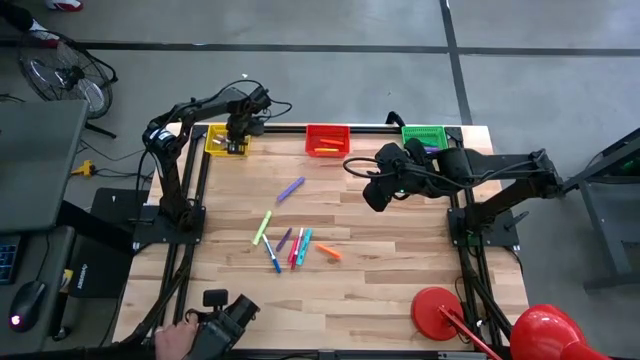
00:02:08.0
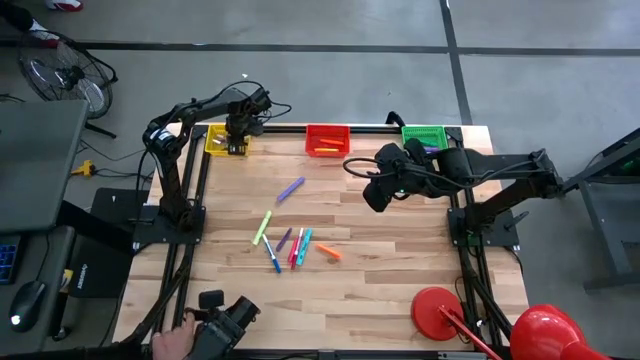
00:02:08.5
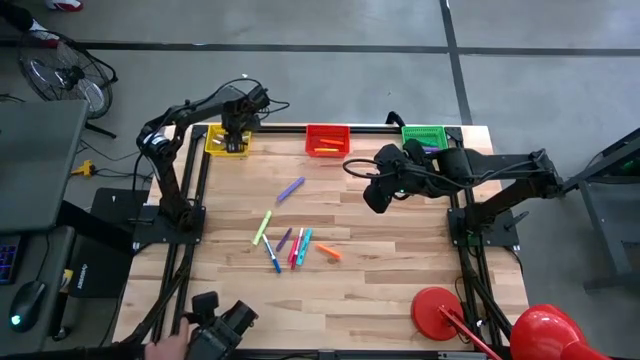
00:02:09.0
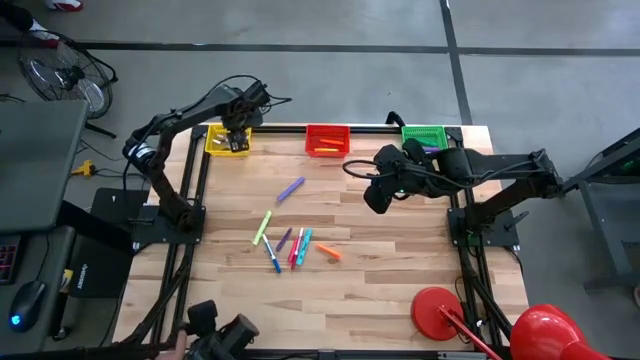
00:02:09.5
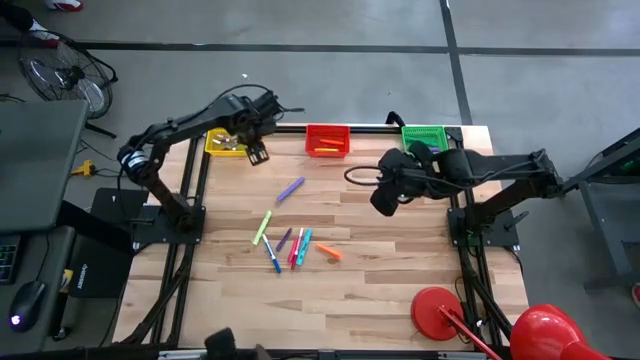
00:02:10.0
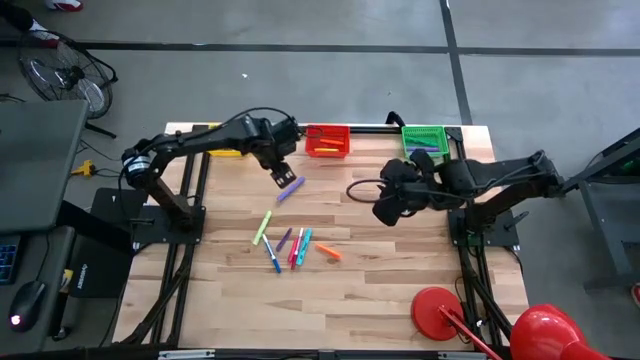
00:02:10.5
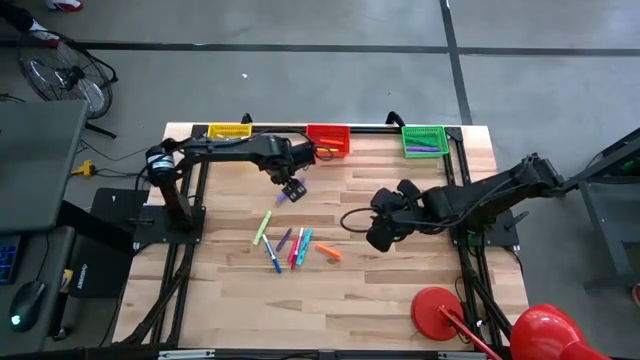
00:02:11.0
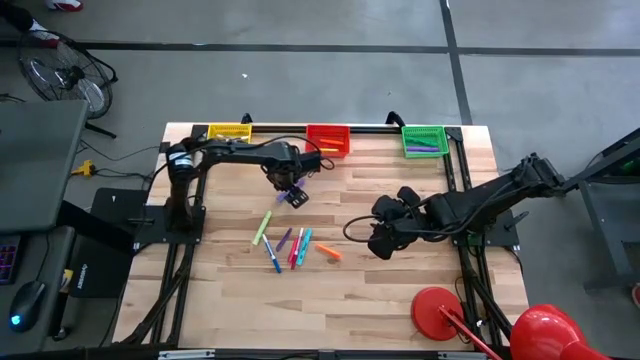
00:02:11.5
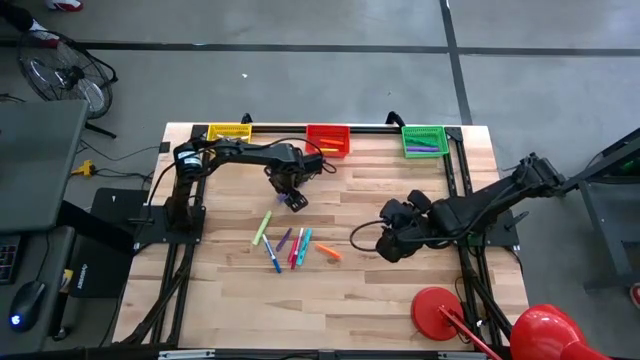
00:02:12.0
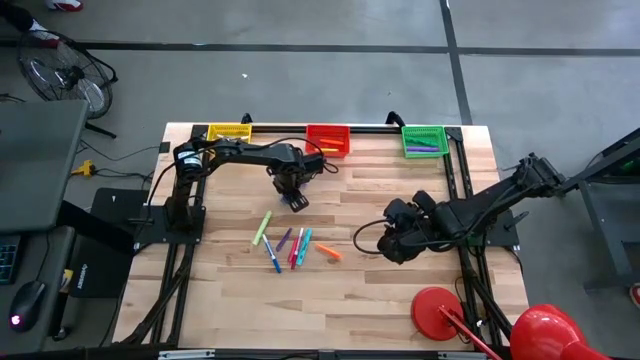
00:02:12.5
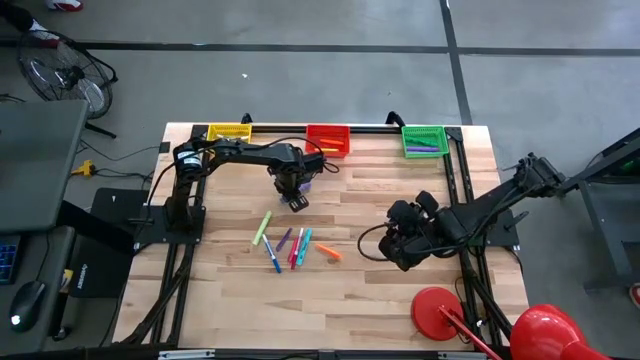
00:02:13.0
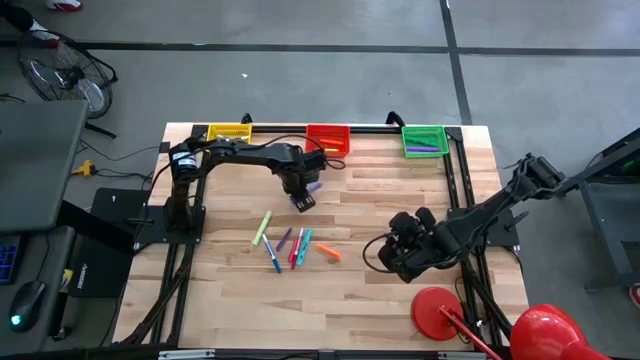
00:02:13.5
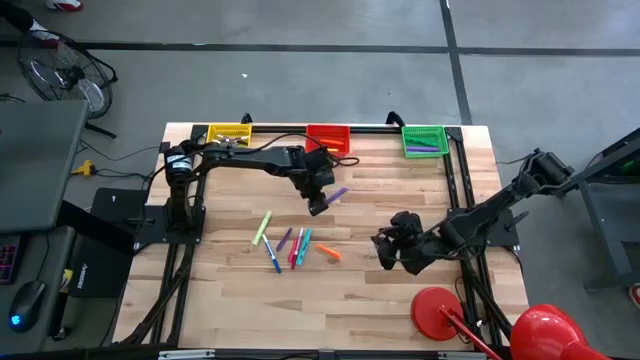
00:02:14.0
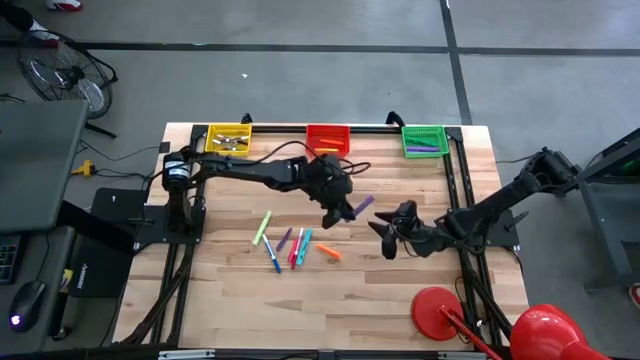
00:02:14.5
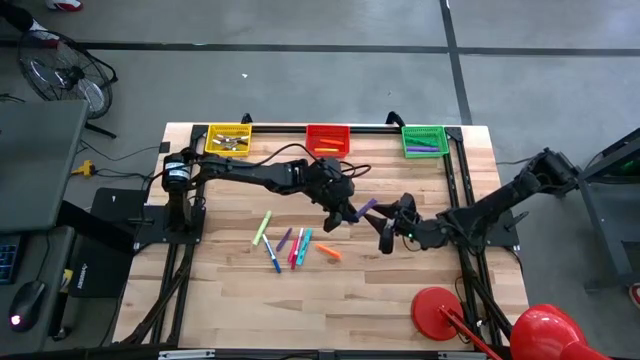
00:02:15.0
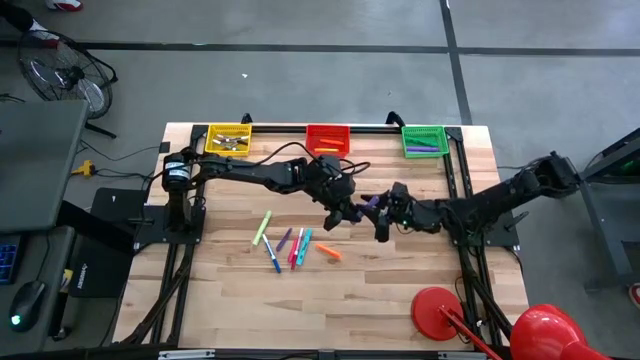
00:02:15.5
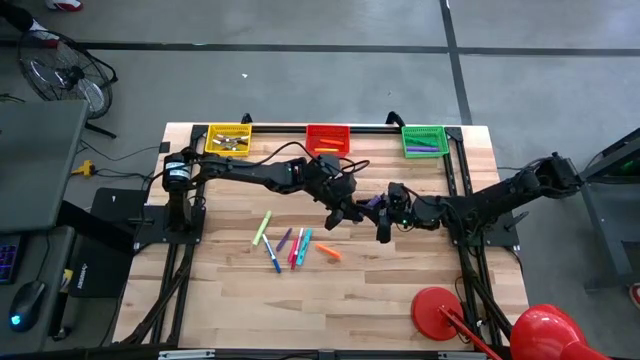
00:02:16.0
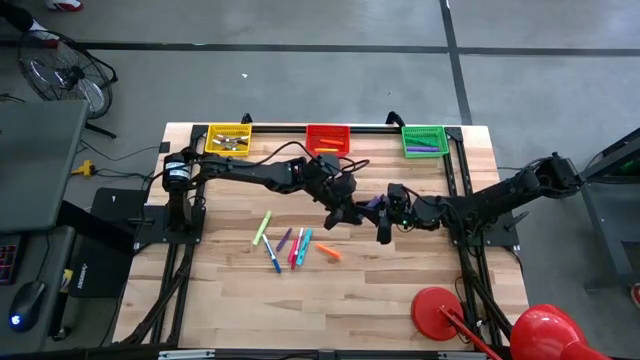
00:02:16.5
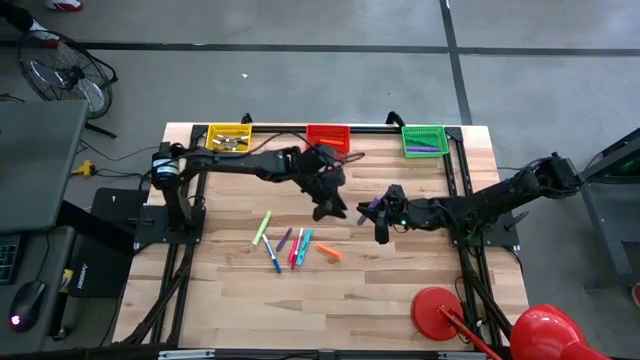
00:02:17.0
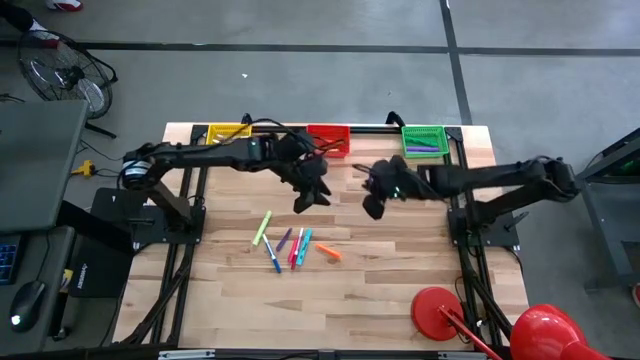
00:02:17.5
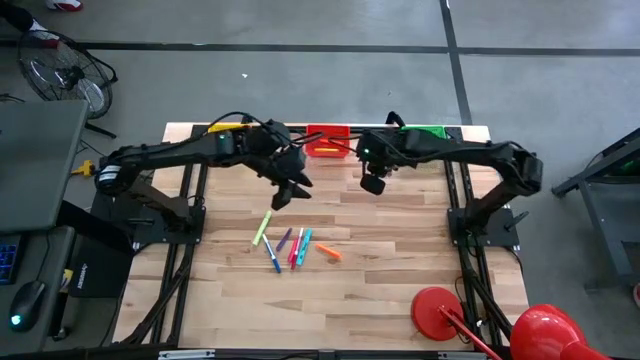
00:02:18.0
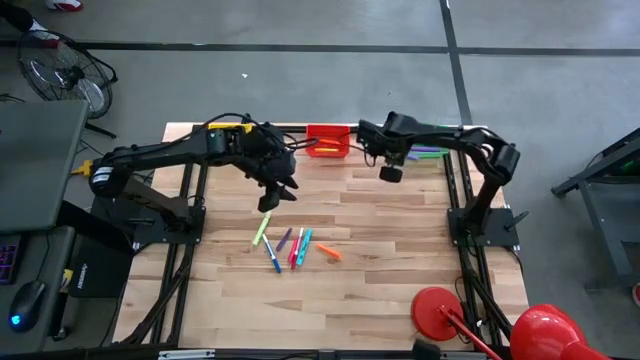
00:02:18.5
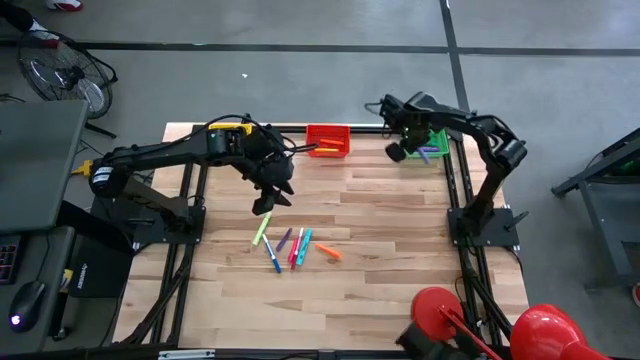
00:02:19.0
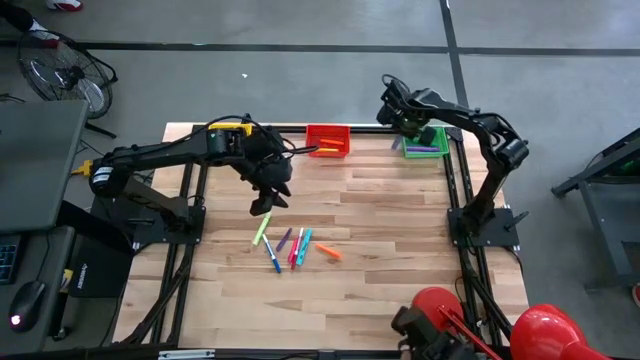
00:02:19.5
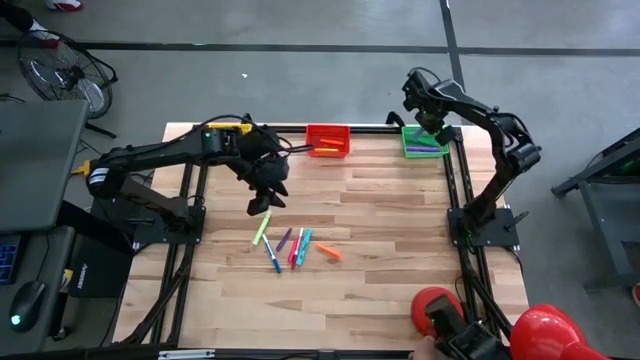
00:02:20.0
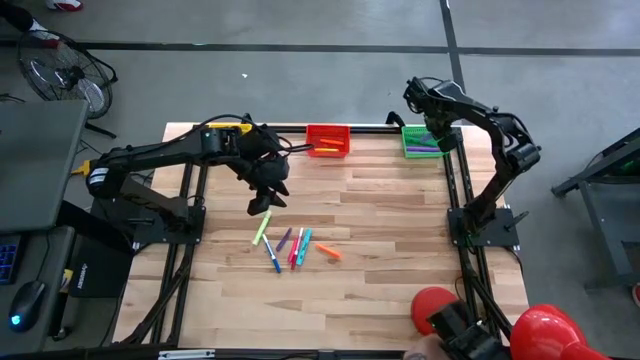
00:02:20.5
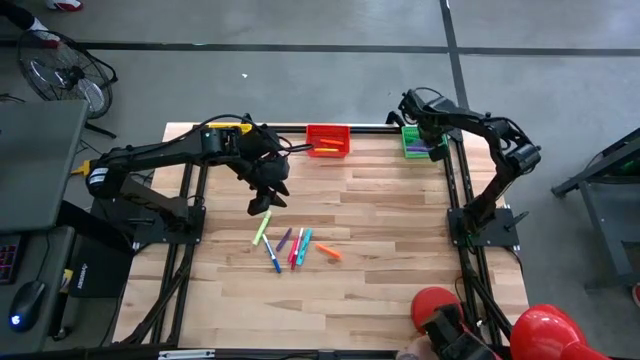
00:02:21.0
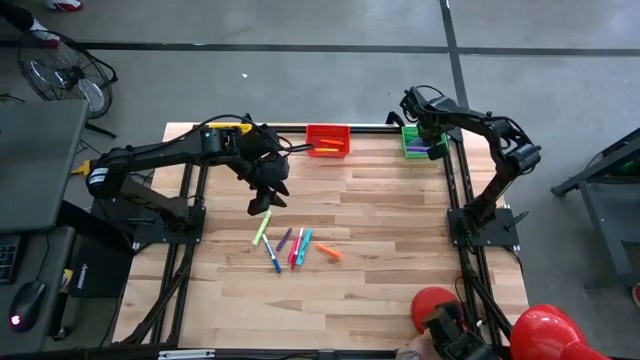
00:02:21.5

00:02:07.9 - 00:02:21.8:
Task: Pick & Place Markers
Put the violet highlighter into the green bin

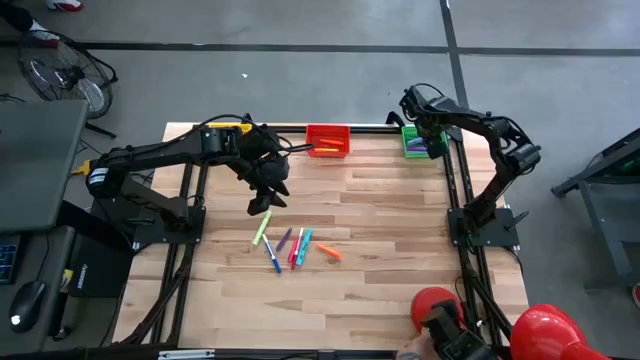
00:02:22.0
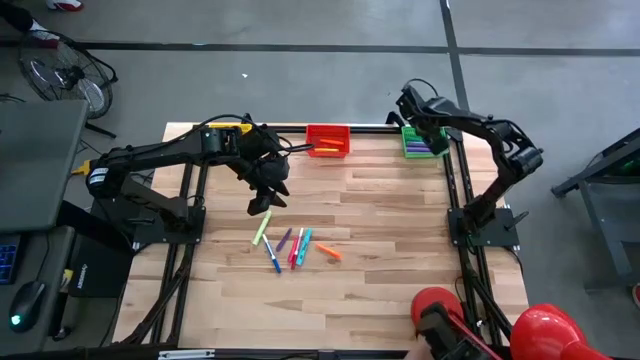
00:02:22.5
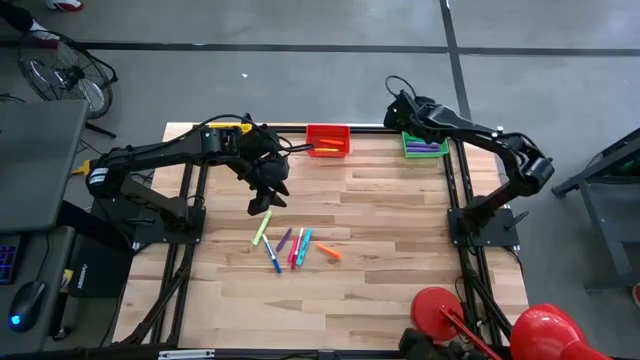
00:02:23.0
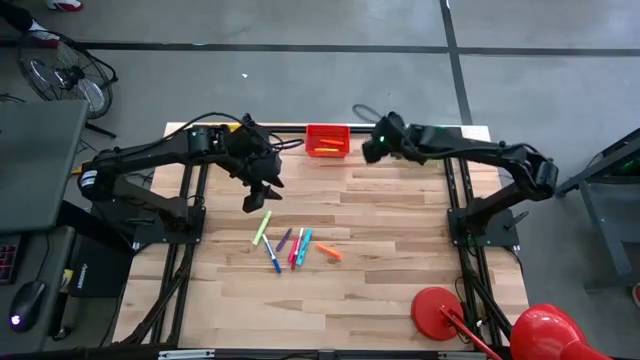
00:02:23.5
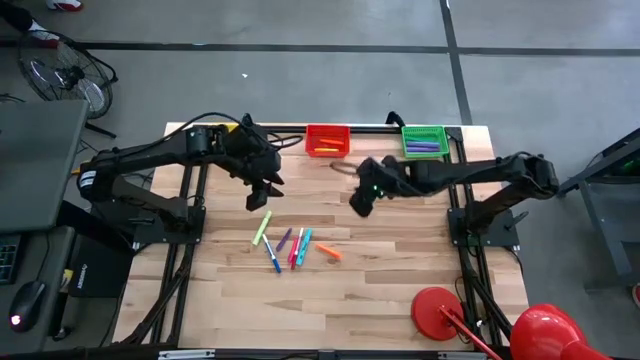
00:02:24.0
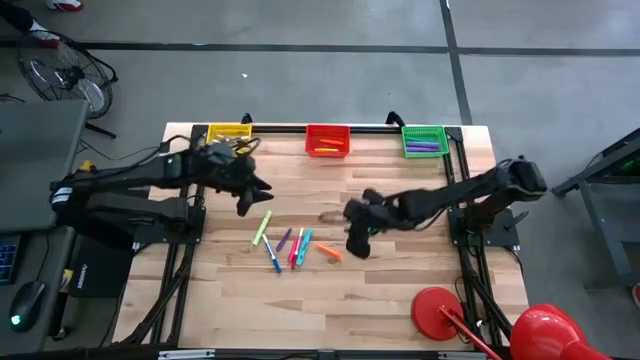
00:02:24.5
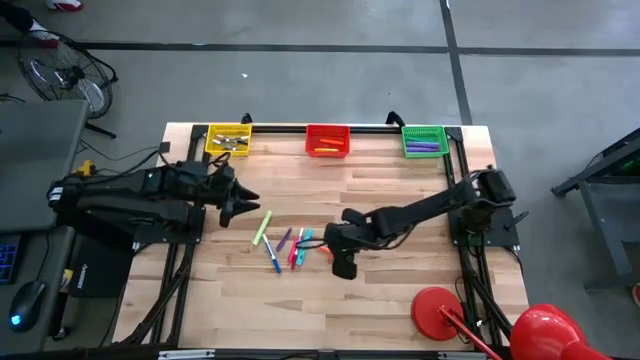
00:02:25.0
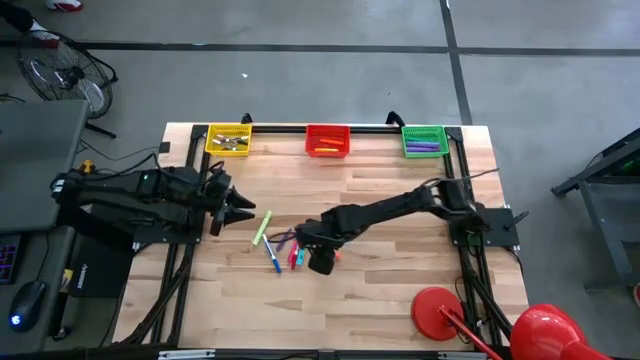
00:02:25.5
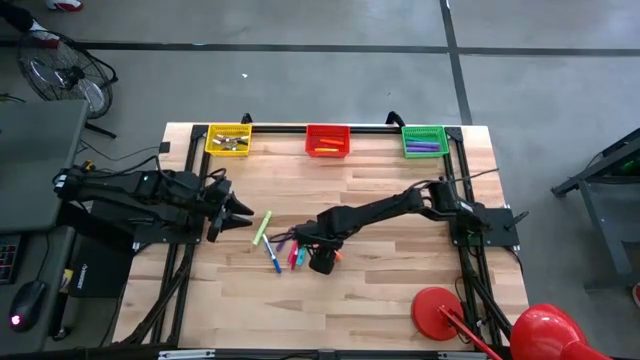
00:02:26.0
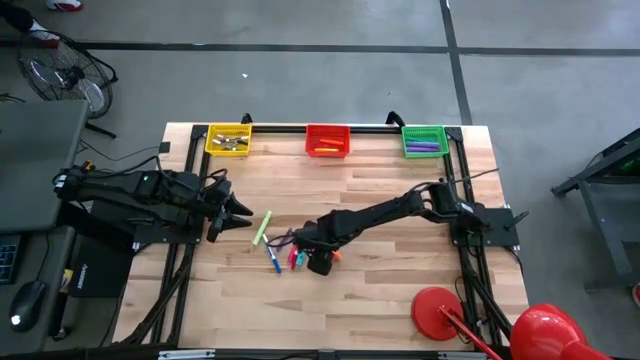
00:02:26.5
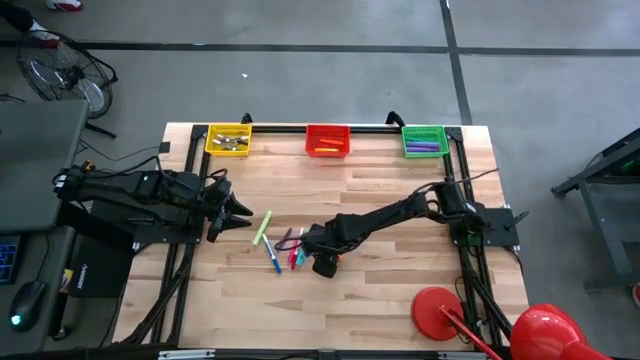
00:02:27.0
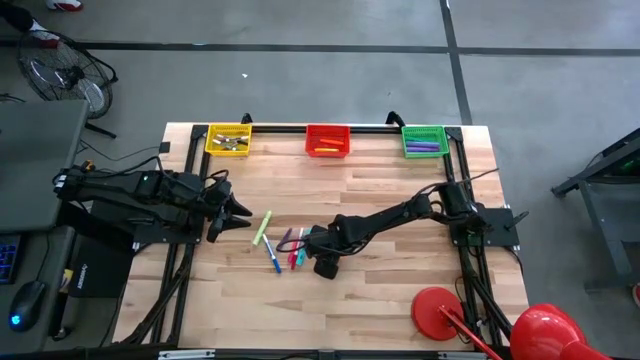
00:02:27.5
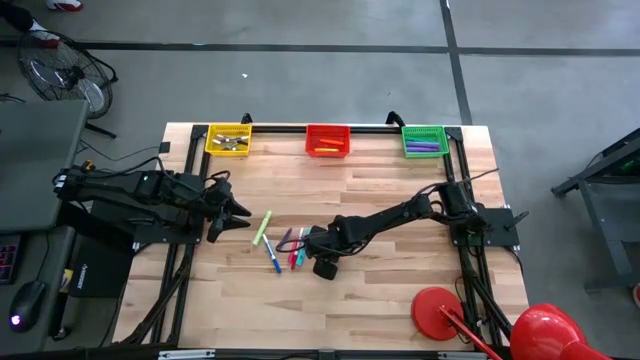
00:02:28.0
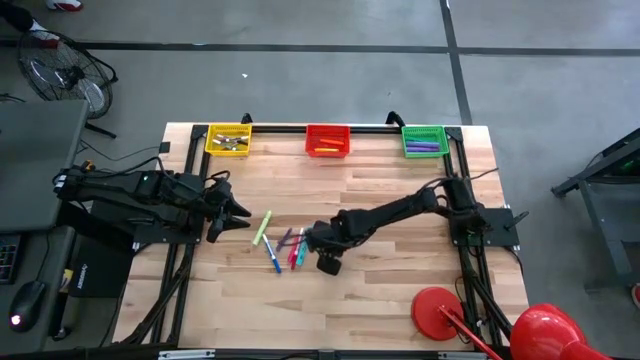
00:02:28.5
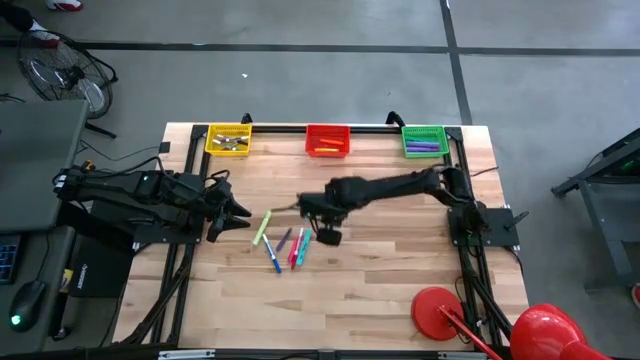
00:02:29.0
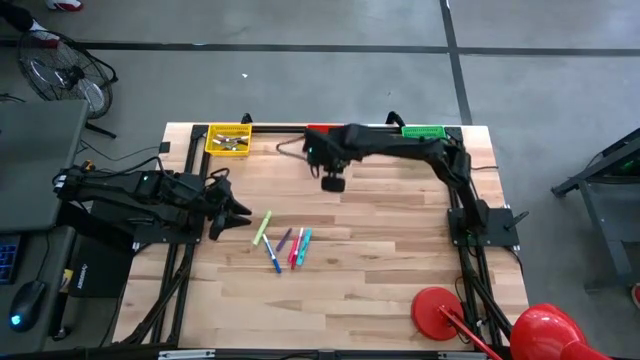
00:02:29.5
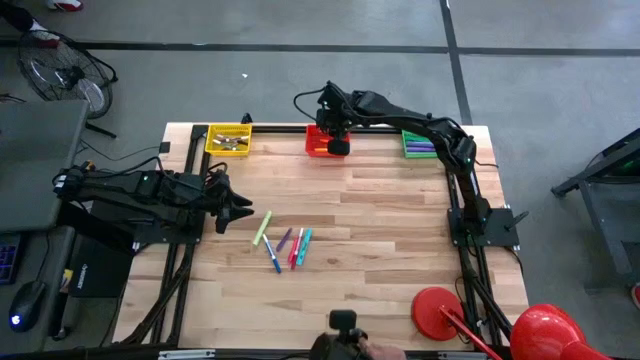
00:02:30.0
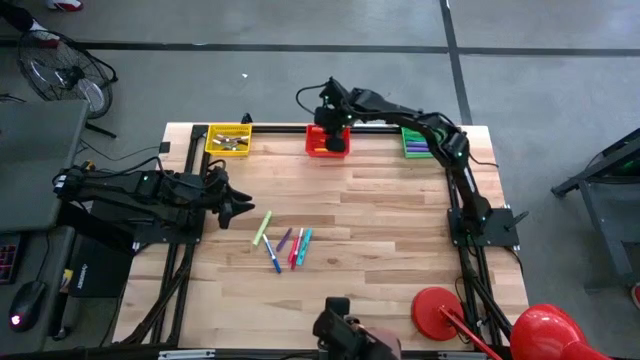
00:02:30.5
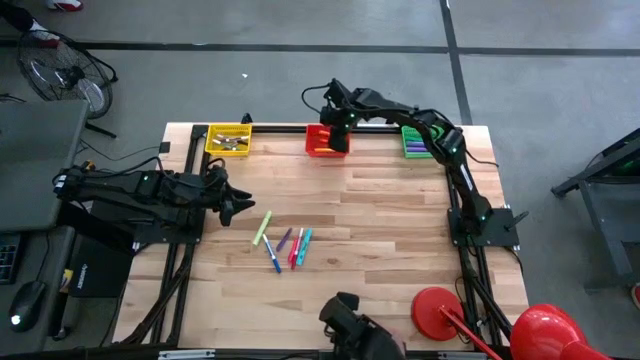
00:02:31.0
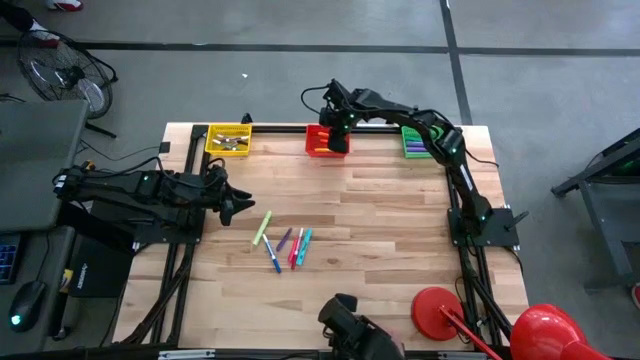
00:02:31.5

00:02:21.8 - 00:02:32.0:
Put the orange pen into the red bin
